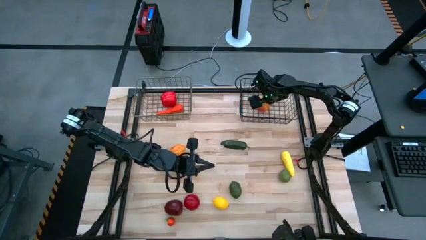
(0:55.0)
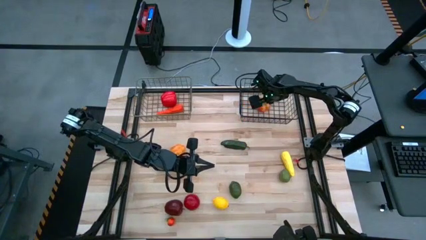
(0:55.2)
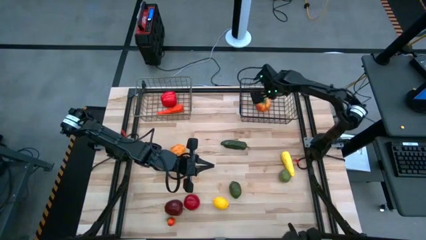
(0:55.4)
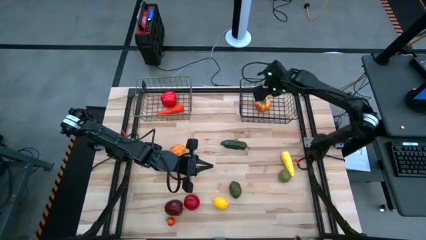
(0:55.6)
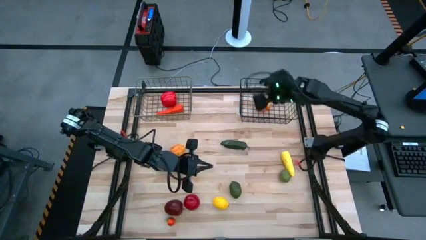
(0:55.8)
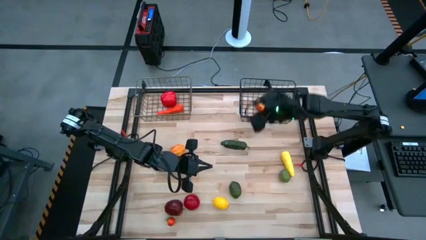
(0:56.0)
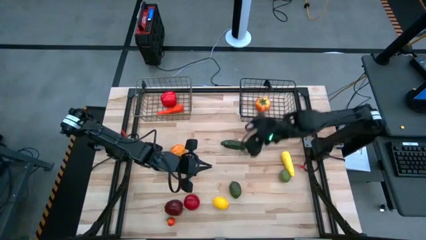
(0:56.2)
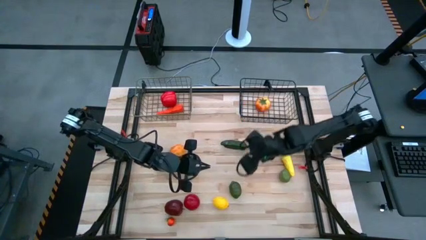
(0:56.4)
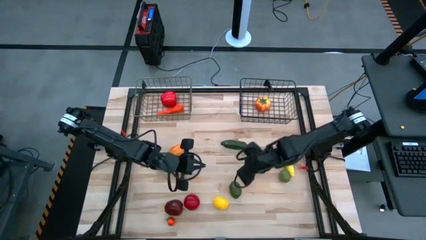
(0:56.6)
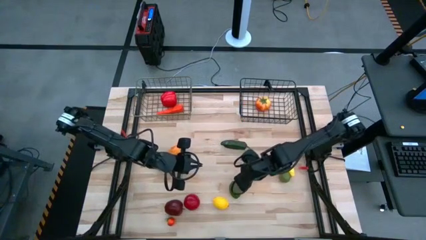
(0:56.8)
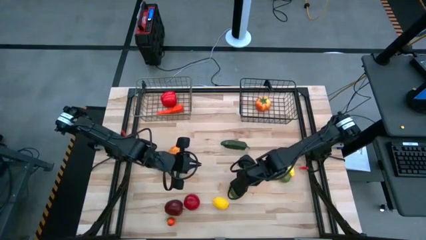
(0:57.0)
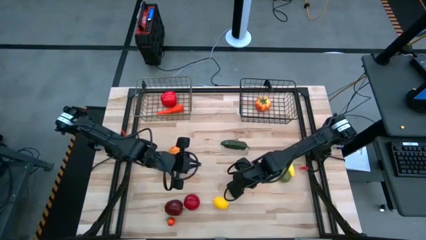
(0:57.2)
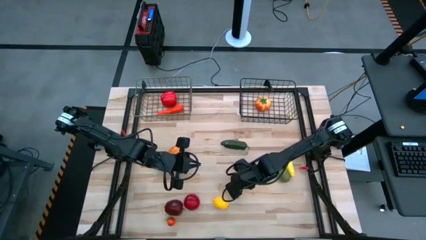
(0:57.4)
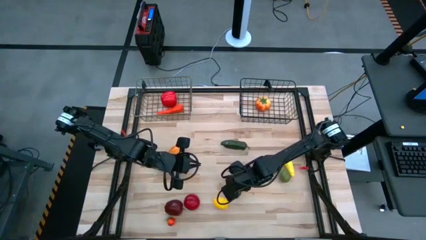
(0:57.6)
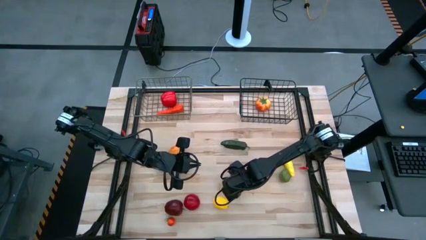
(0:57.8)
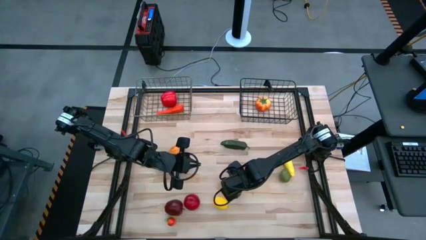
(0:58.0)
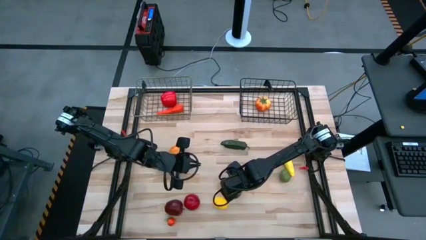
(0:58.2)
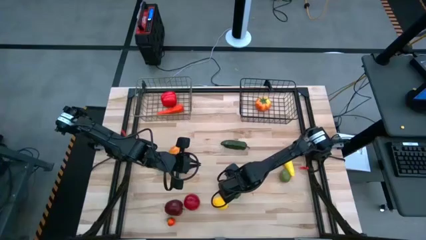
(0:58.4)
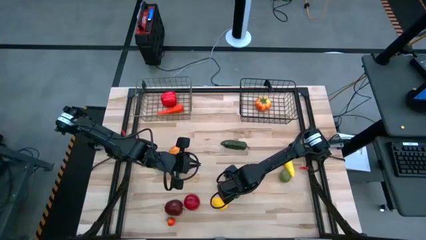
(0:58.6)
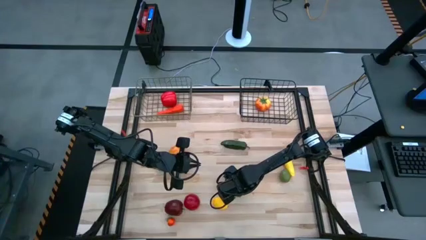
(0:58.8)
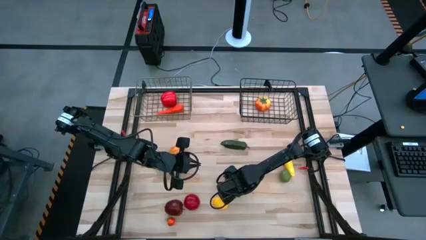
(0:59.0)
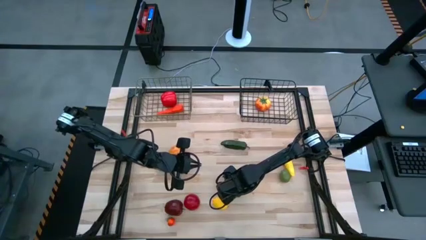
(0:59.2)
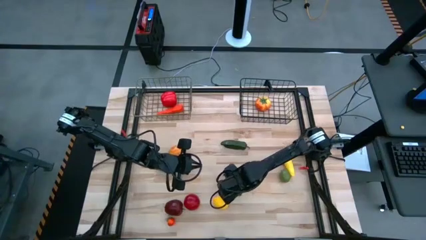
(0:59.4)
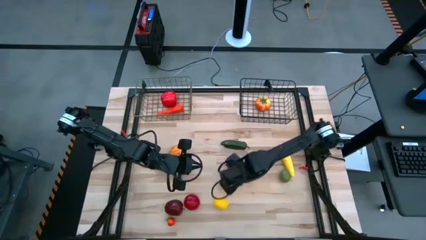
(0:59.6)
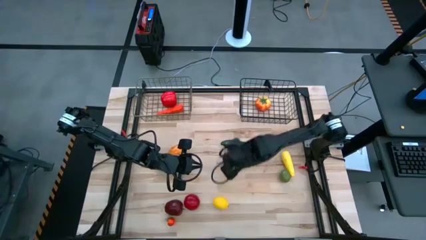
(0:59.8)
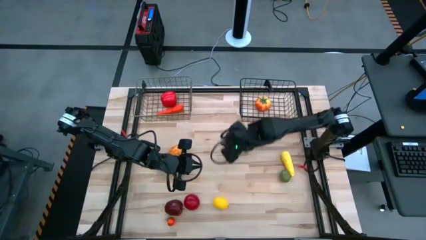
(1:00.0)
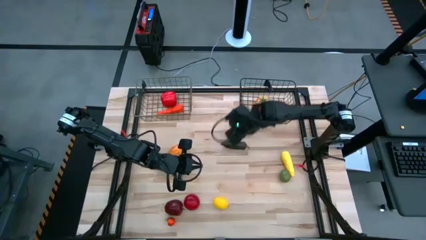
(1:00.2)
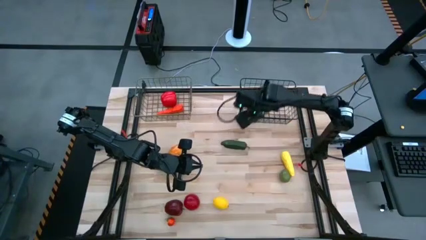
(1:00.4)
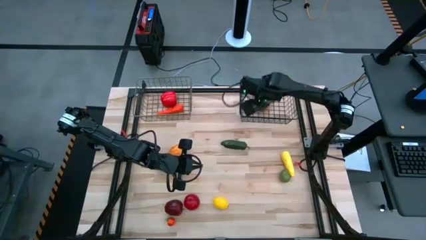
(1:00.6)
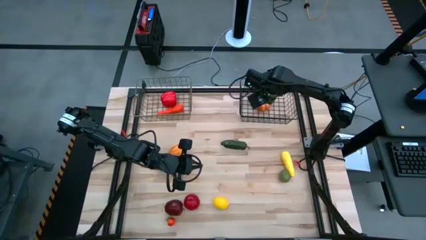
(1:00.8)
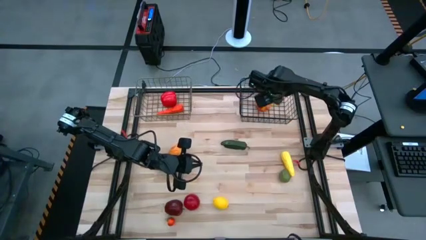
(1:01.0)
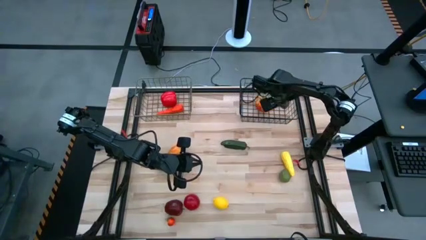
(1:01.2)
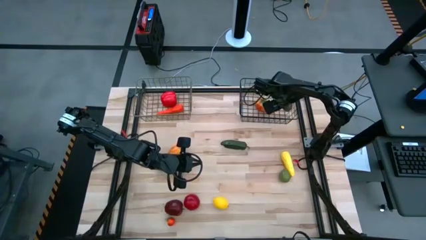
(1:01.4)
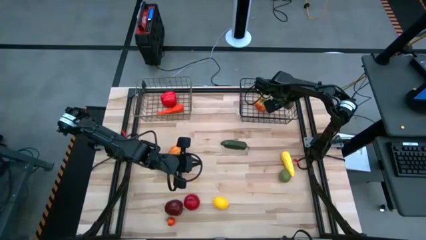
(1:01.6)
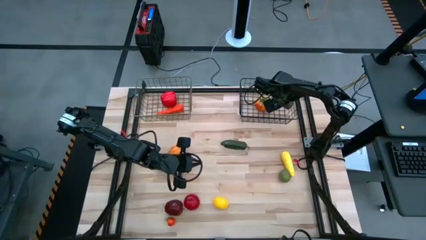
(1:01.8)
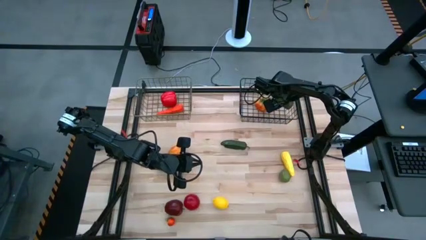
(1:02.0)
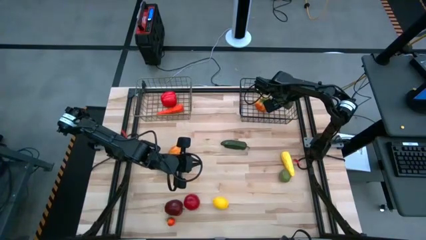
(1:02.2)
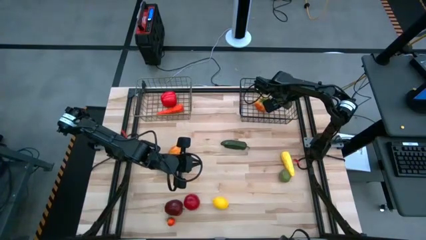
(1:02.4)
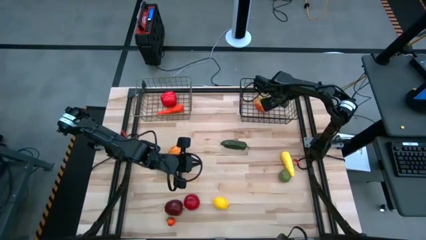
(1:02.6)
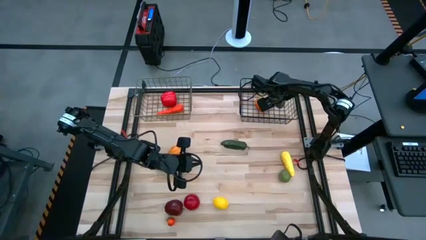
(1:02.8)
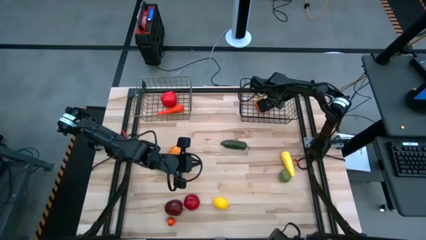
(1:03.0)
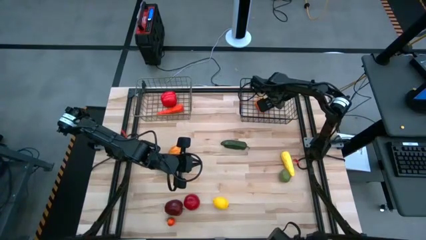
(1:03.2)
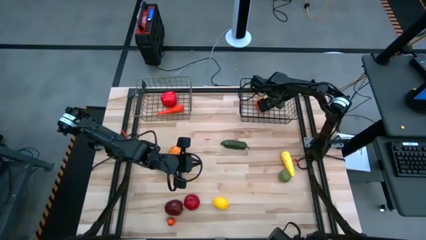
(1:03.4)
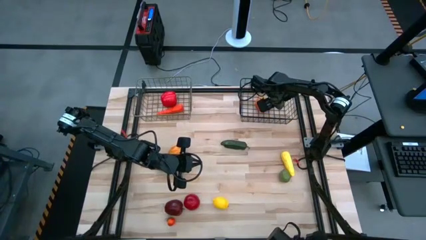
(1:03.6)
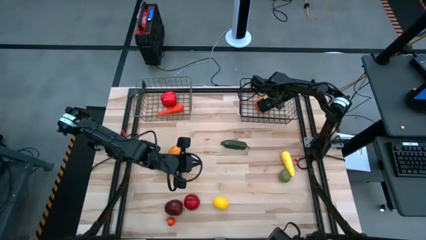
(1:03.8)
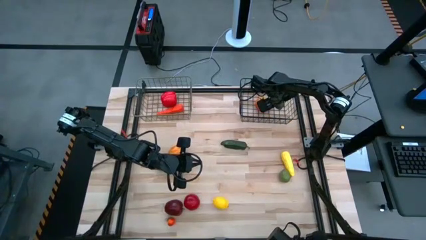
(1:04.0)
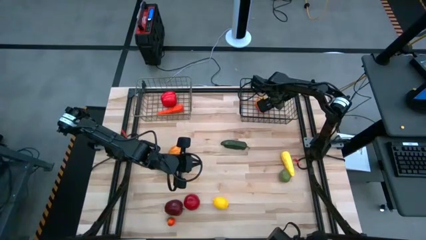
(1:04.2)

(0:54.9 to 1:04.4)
Task: Sort produce into baskets
Put the lime into the black wire basket

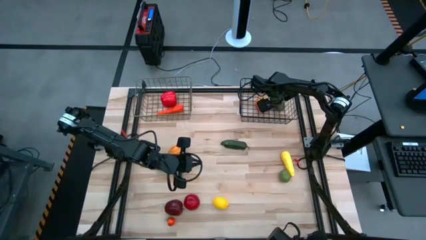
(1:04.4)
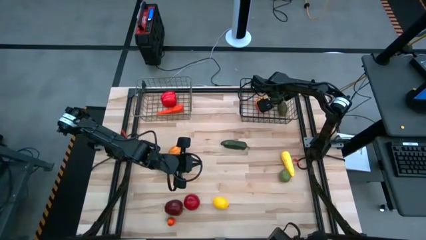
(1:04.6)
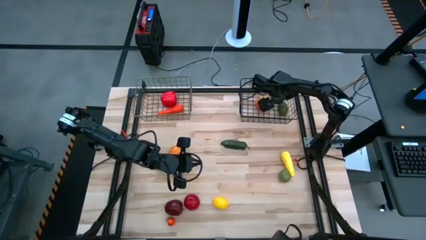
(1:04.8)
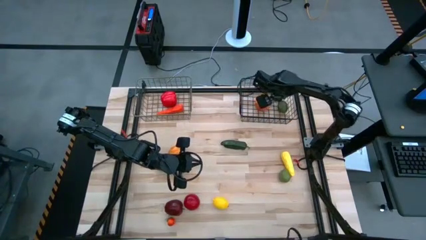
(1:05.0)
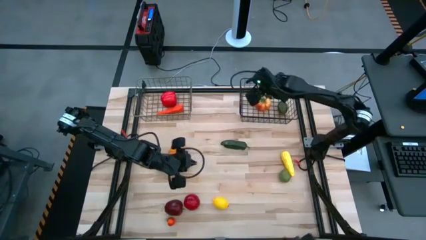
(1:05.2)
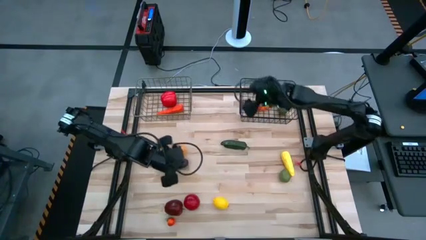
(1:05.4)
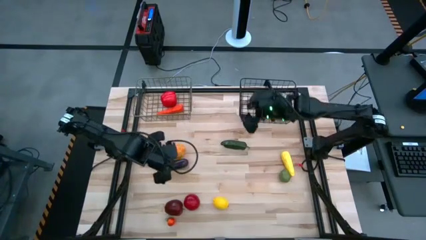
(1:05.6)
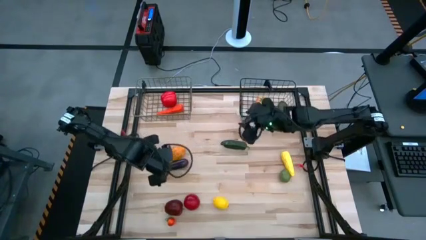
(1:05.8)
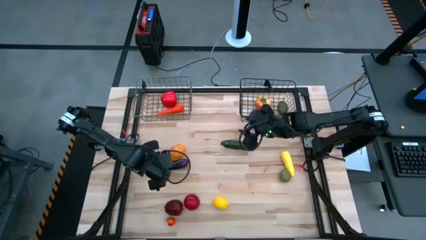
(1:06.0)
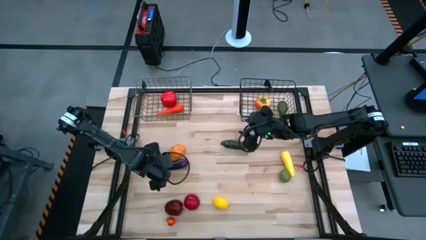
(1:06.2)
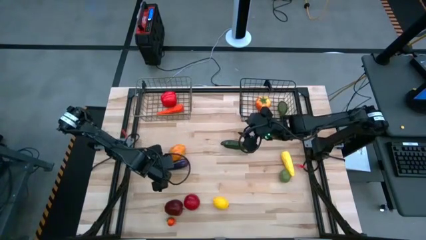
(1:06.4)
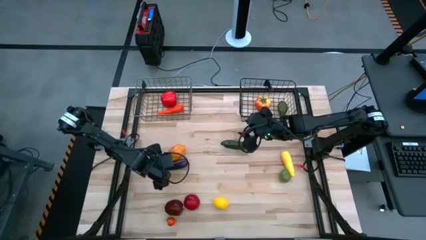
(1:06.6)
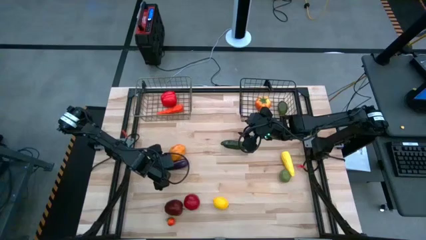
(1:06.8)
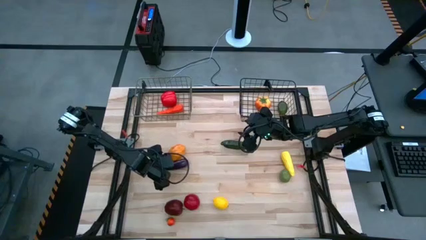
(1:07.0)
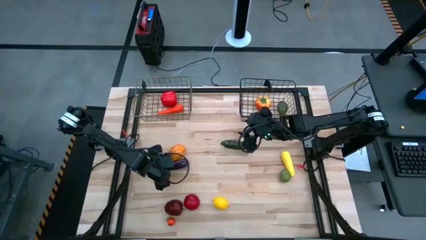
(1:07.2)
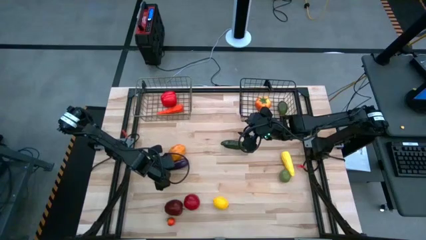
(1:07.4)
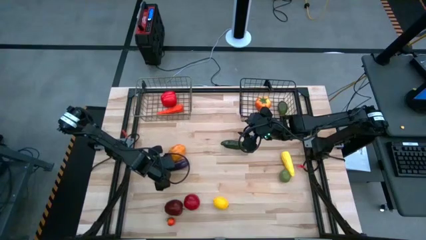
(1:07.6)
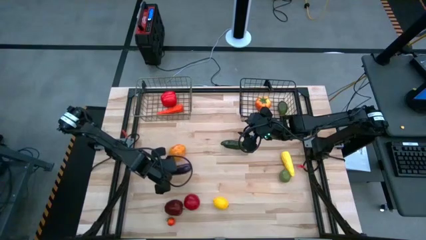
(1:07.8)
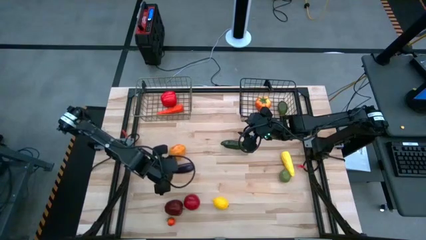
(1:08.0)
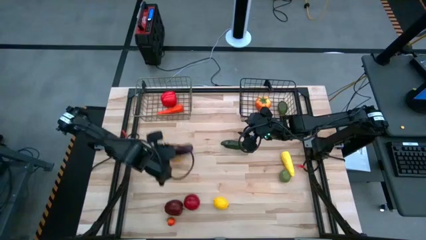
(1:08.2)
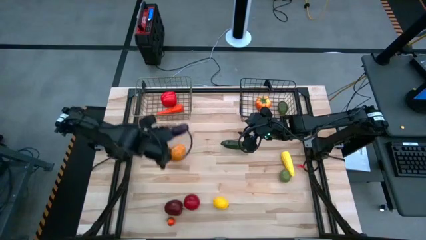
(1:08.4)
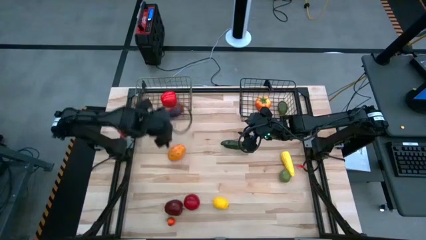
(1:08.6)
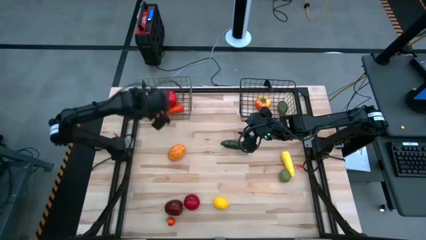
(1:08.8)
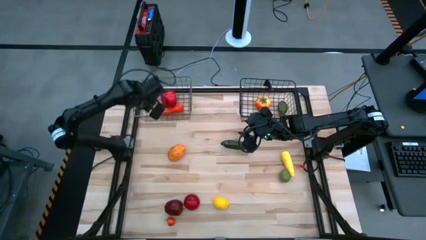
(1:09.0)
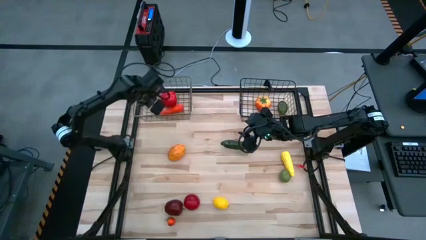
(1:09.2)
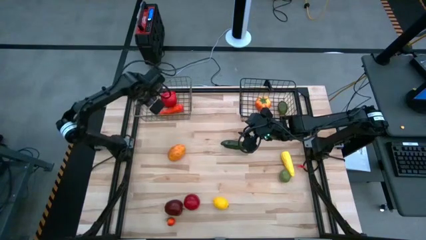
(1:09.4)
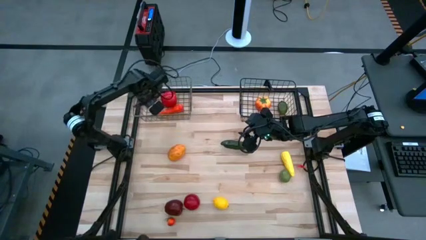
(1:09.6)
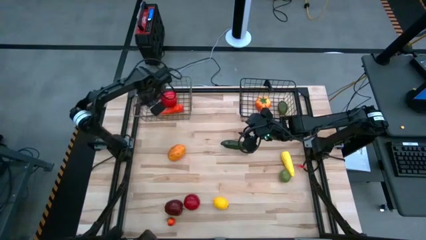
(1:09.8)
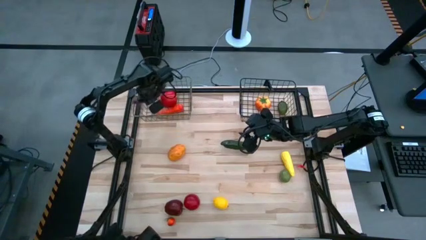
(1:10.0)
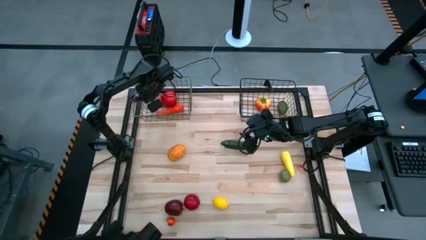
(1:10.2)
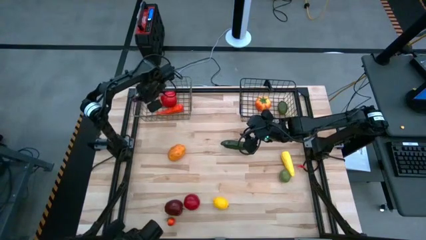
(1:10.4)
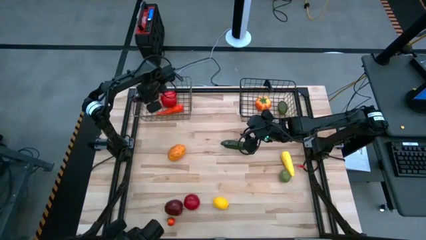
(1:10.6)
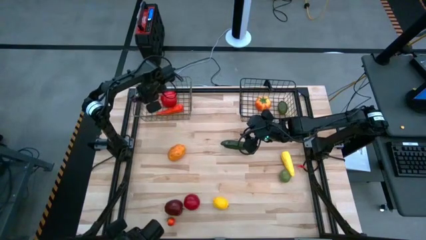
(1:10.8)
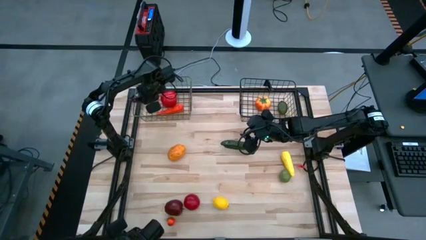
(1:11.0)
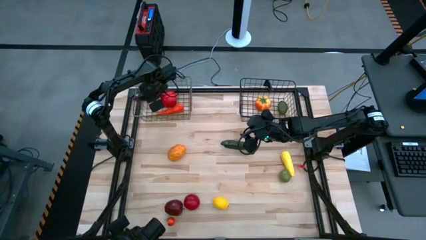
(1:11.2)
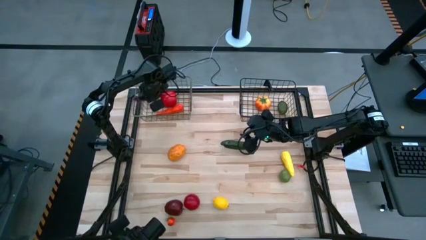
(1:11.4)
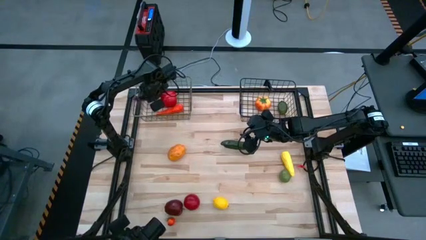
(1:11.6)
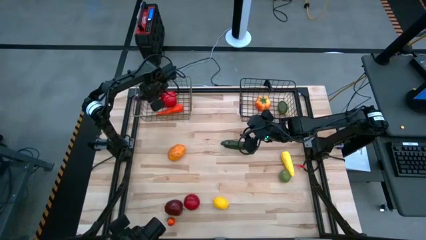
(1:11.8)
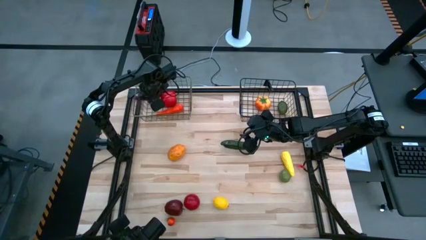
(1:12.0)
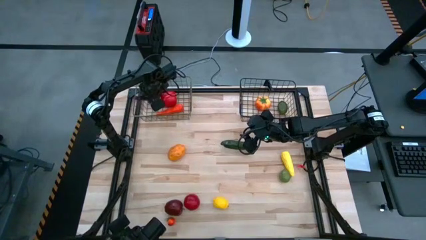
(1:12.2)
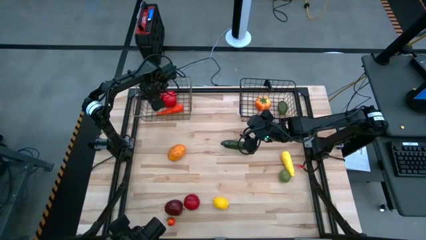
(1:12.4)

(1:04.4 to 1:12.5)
Put the egg plant into the brown wire basket
